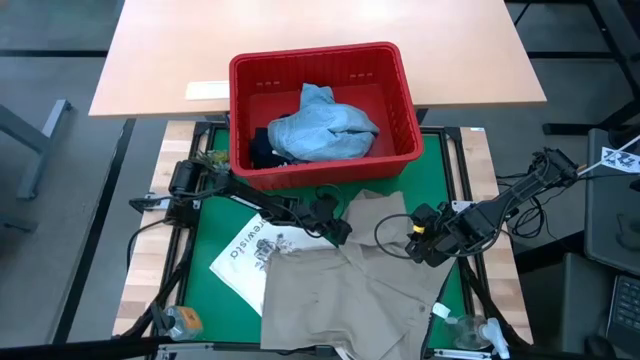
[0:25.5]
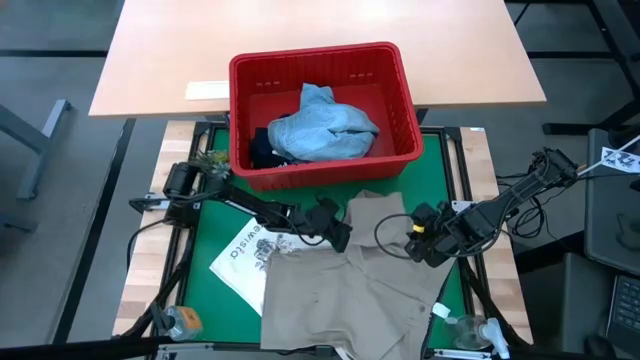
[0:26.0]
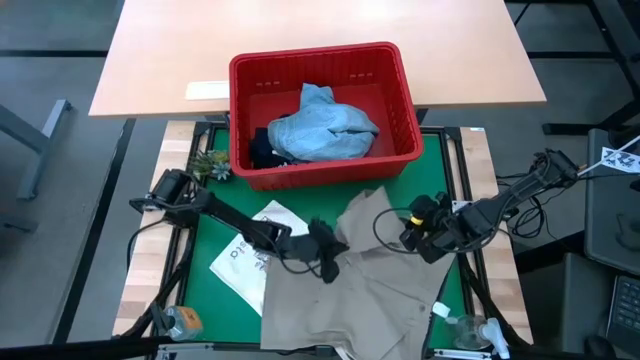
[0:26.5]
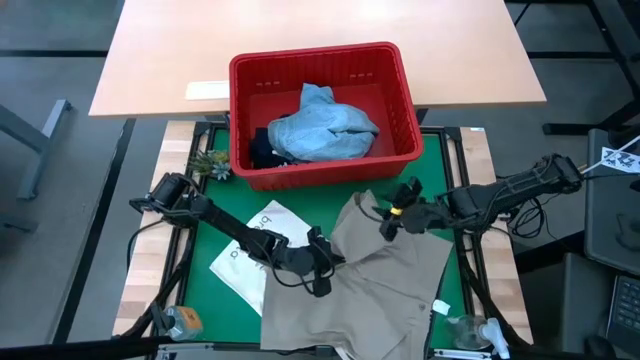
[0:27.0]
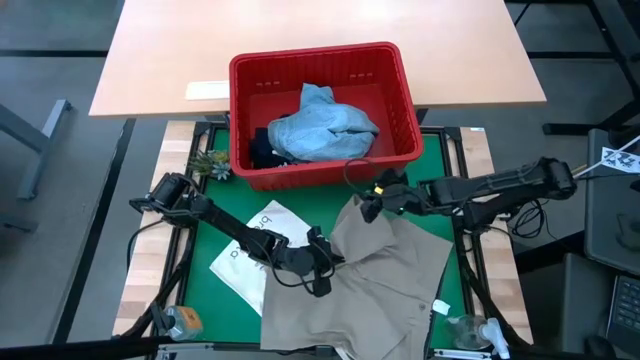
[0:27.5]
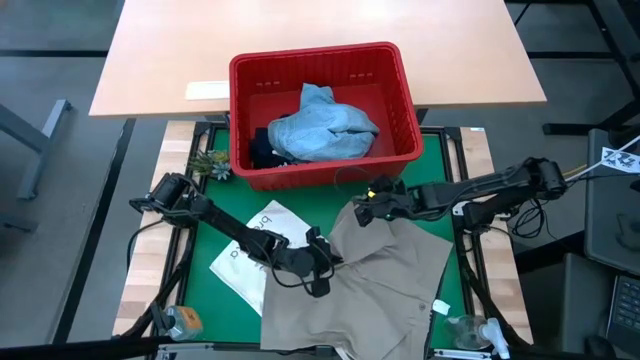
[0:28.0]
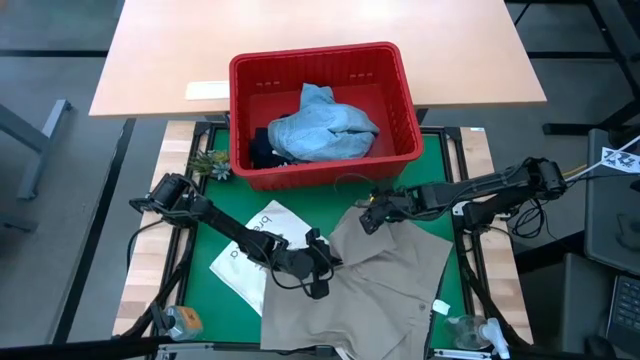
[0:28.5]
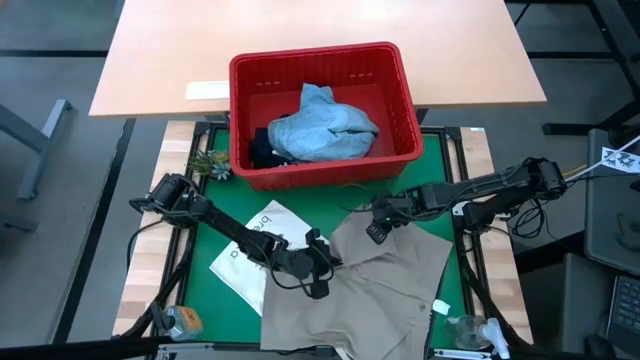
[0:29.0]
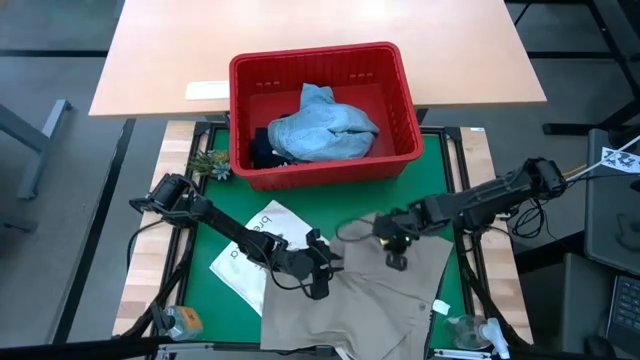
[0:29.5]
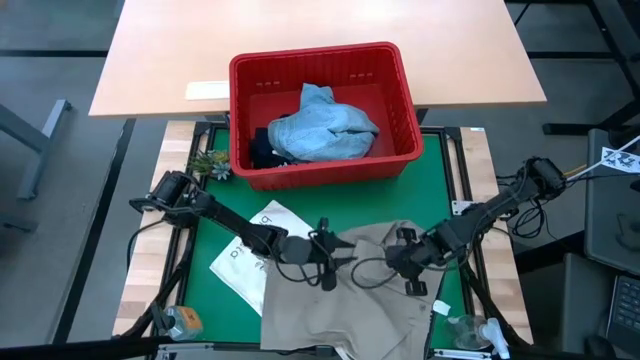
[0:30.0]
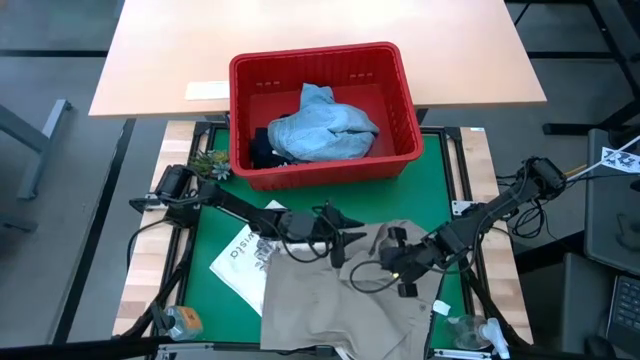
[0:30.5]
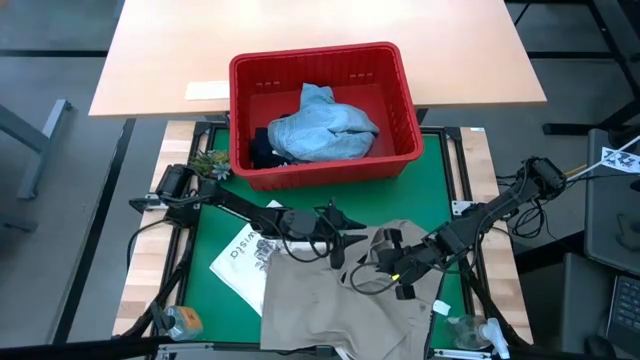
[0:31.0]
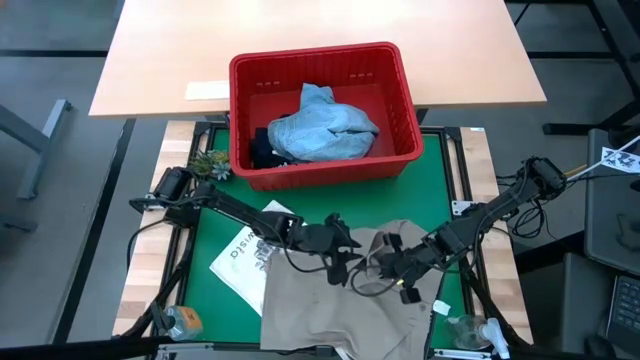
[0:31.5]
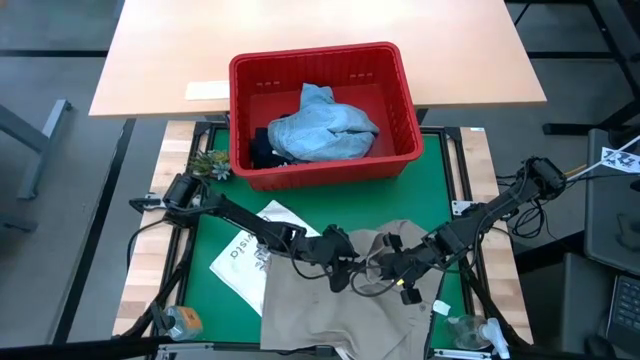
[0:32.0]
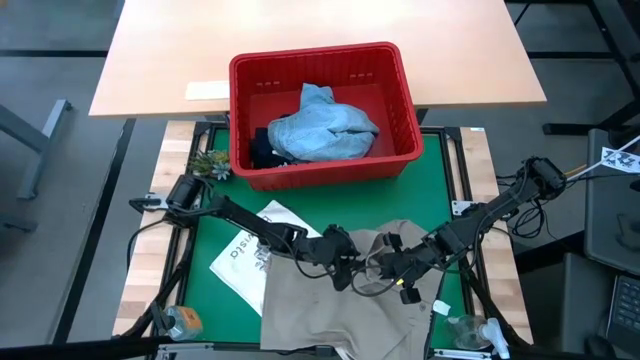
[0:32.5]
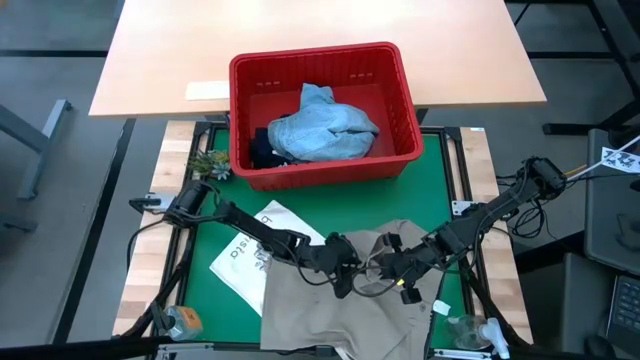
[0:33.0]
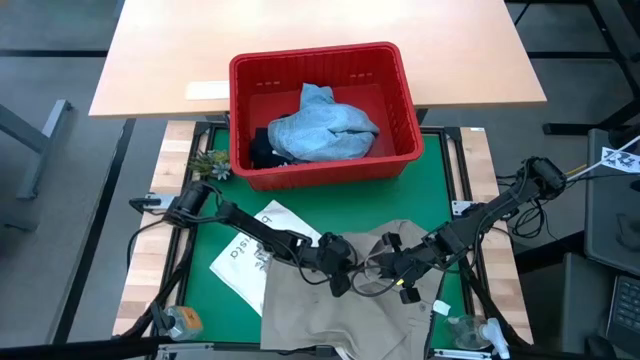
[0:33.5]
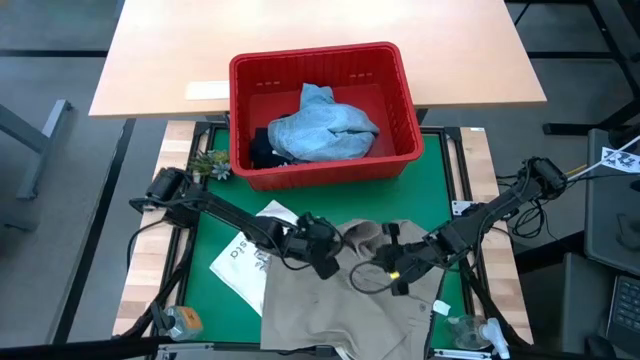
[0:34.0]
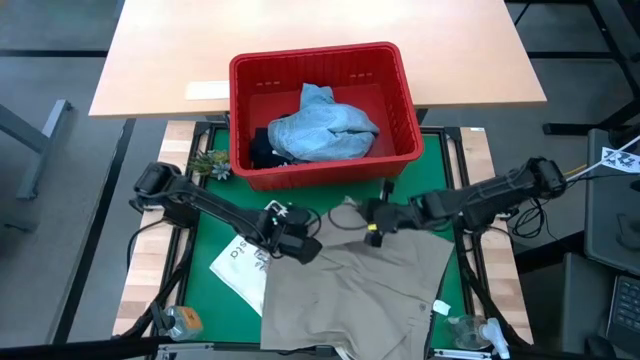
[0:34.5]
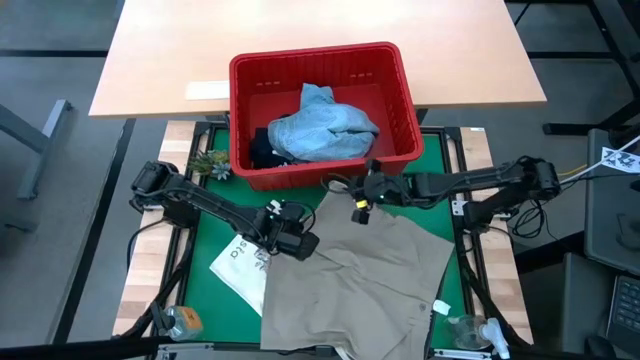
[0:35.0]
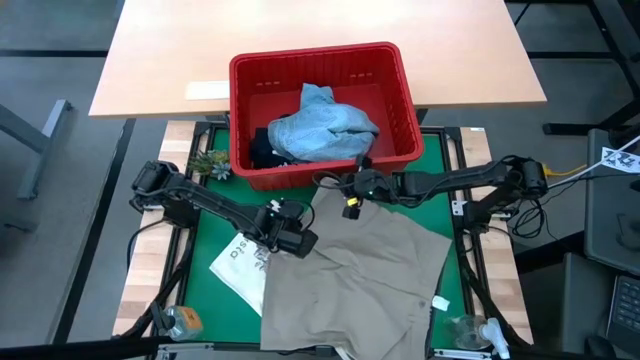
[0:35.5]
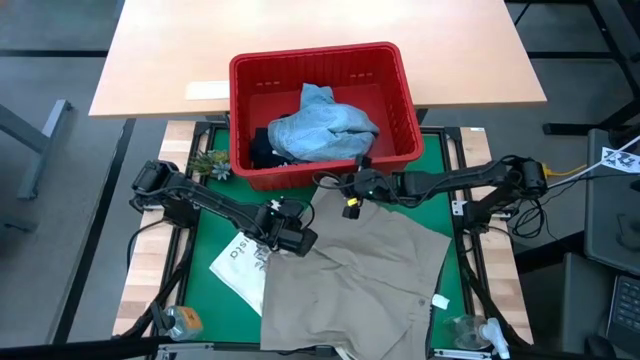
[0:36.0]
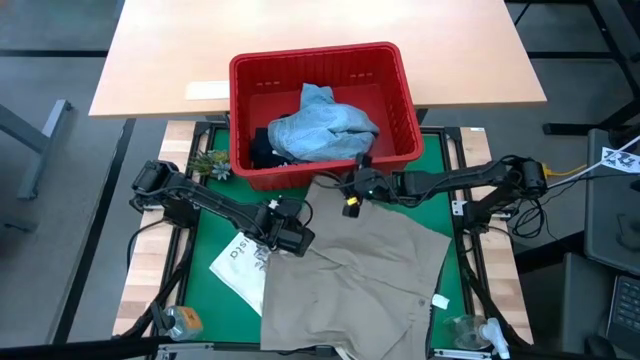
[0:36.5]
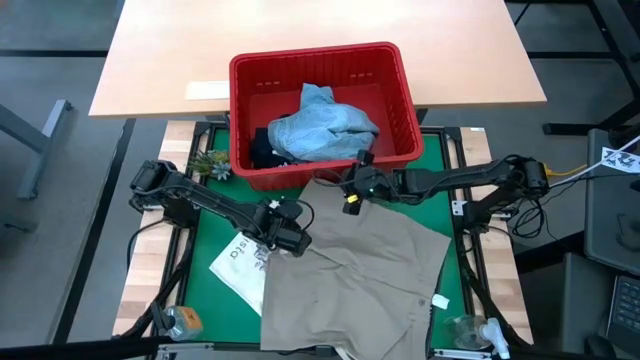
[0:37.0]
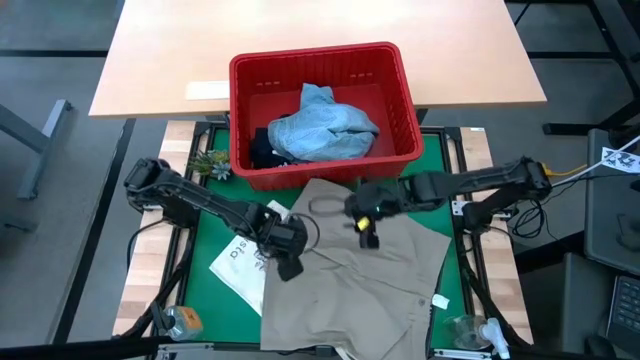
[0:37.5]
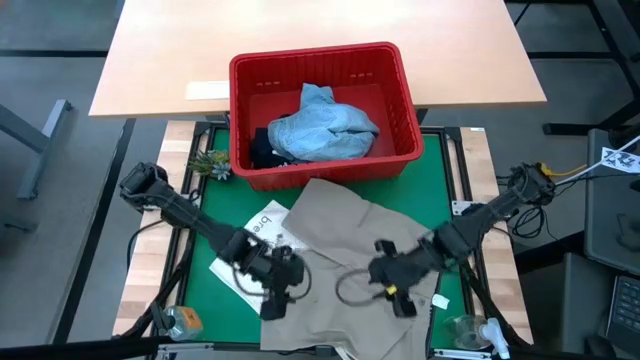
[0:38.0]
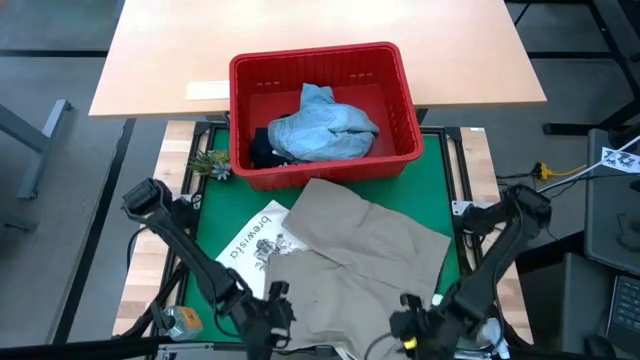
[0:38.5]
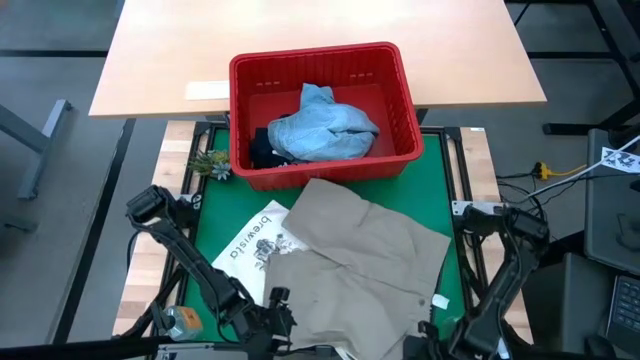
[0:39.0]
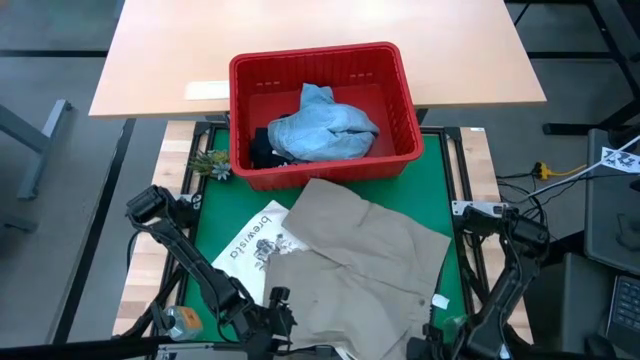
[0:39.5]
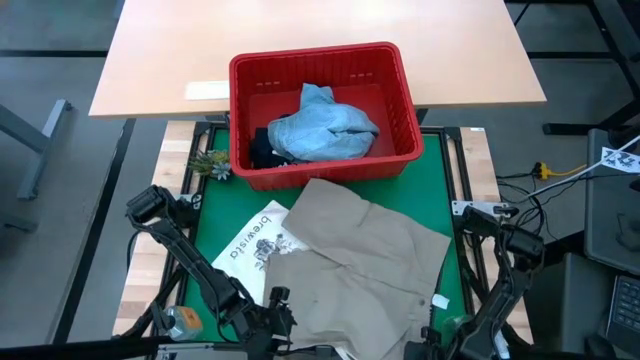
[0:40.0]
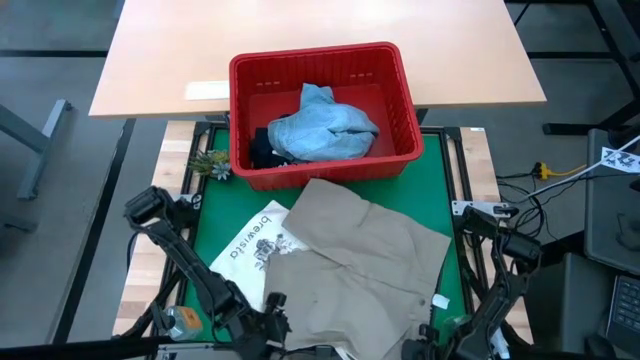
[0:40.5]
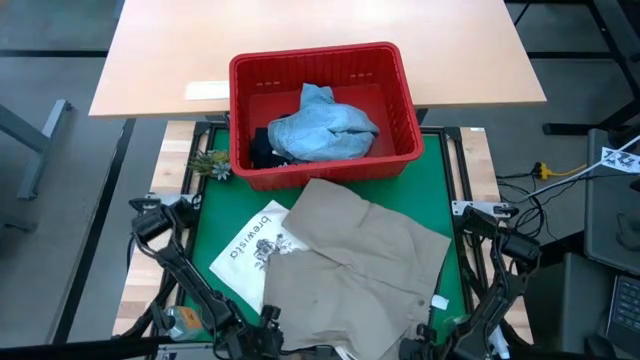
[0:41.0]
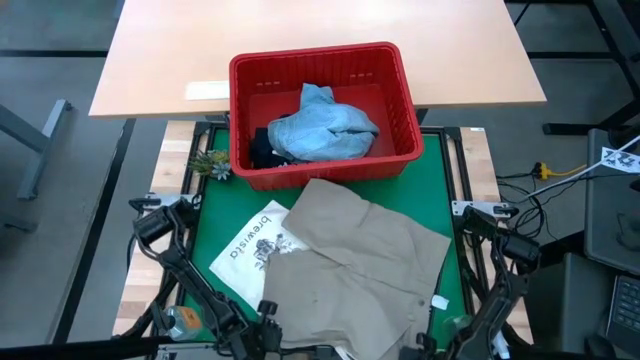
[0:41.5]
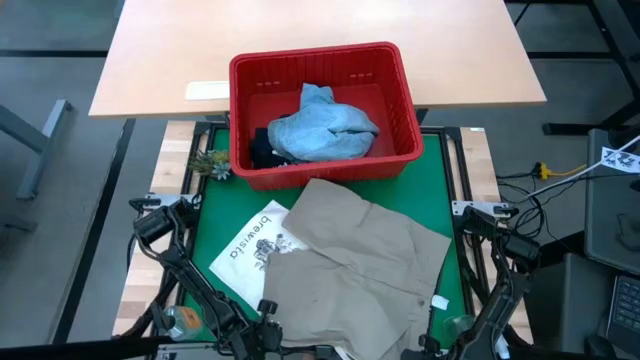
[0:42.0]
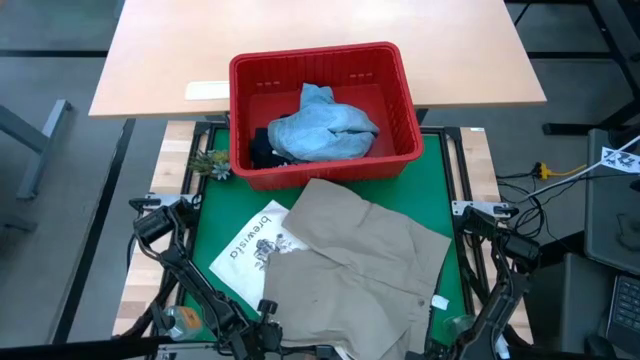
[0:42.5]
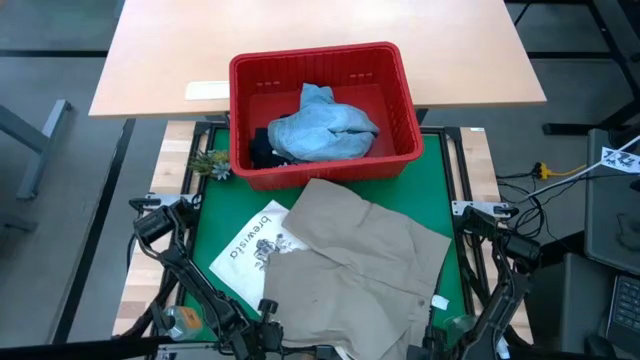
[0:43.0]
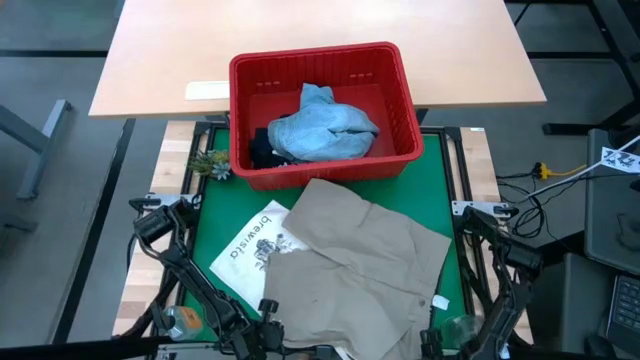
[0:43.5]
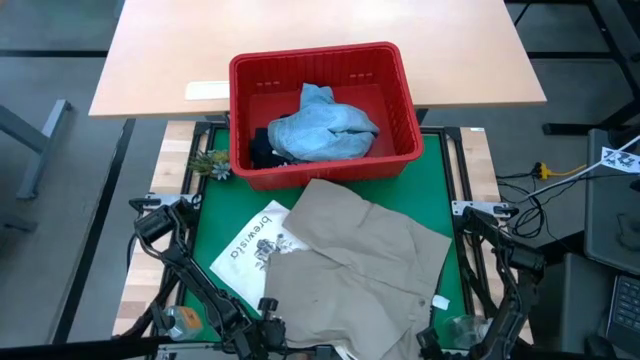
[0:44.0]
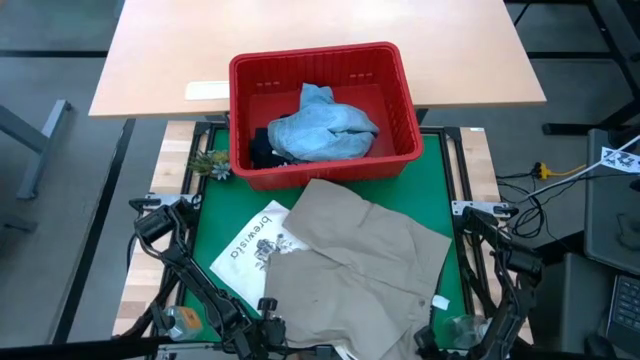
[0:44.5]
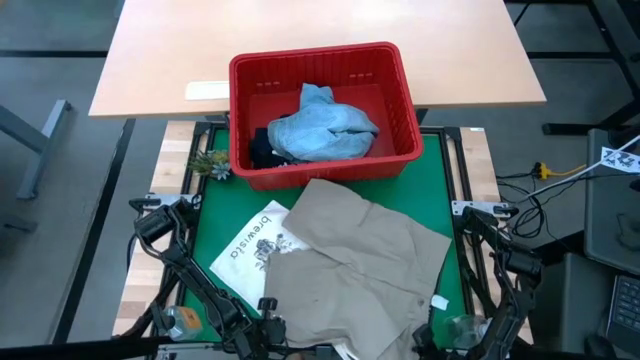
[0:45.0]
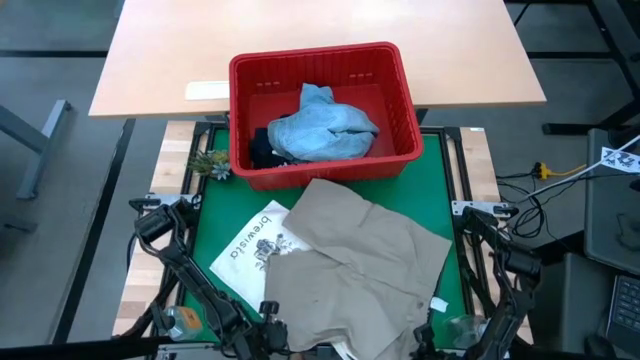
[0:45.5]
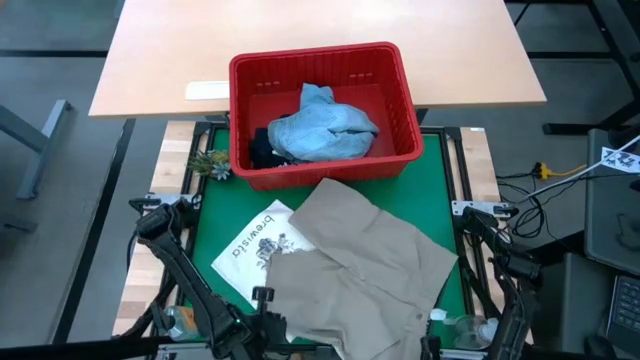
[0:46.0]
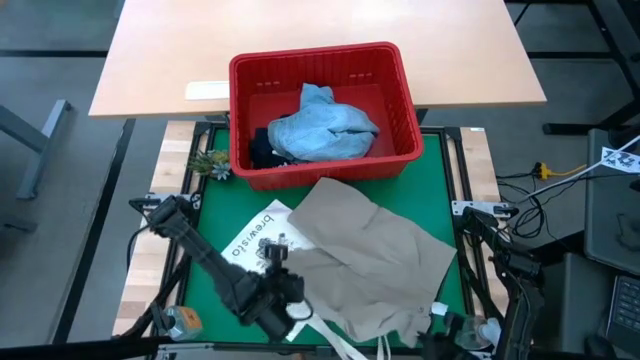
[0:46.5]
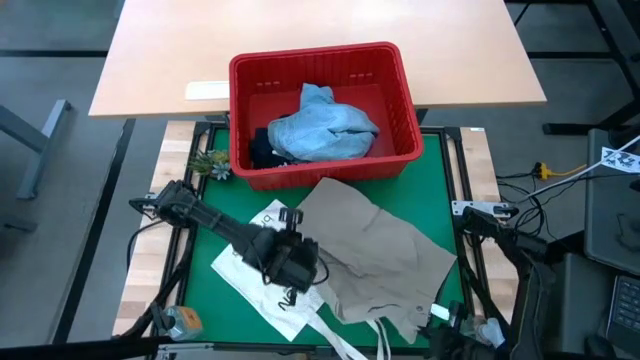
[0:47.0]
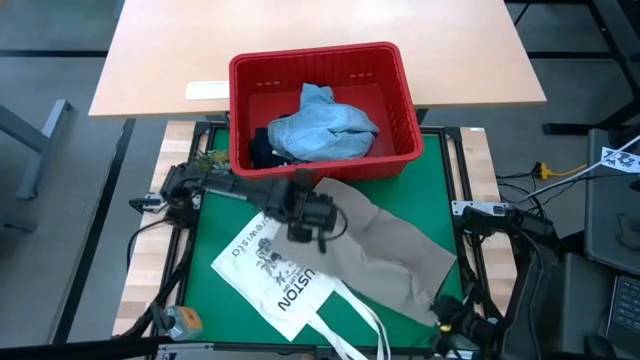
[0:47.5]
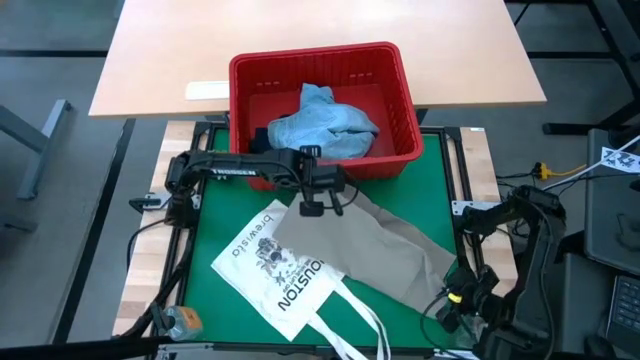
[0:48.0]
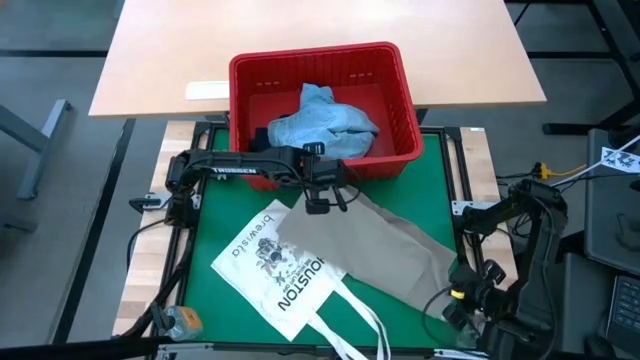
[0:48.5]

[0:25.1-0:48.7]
Task: Fold Laundry from Bin
Fold the beige shorts
